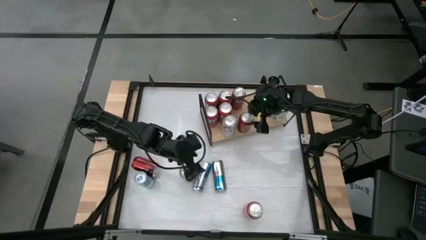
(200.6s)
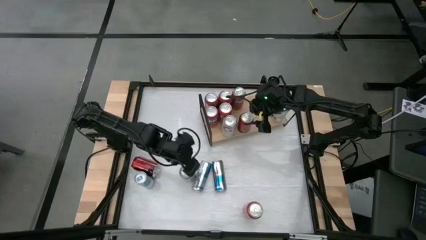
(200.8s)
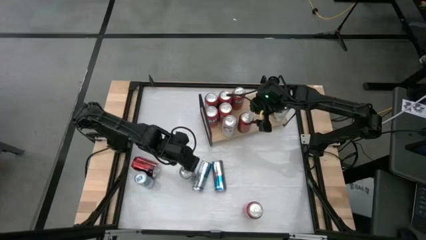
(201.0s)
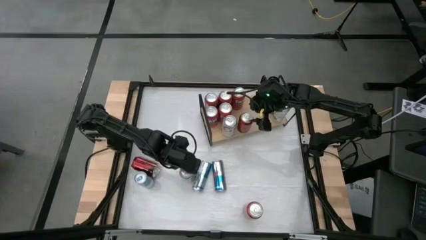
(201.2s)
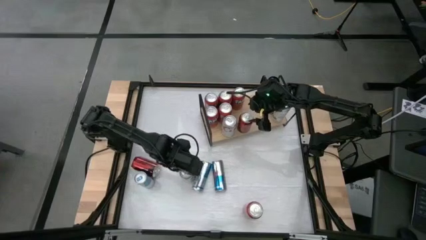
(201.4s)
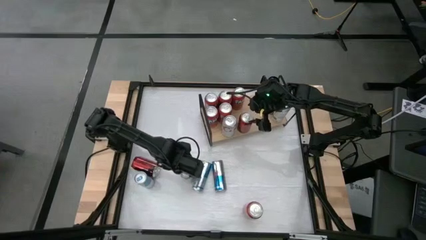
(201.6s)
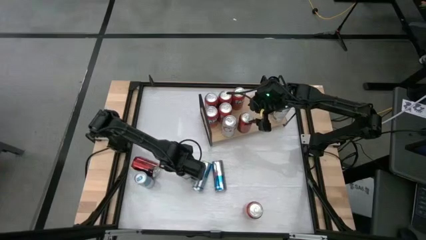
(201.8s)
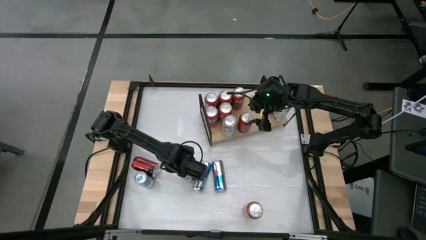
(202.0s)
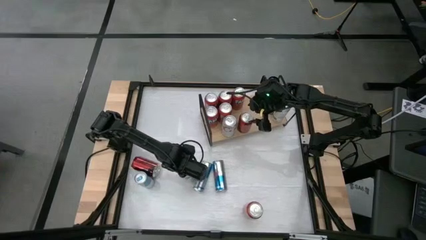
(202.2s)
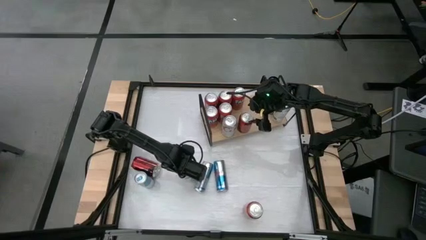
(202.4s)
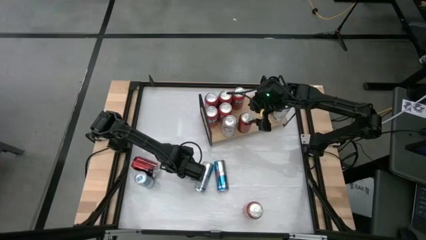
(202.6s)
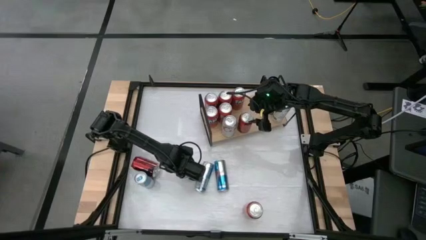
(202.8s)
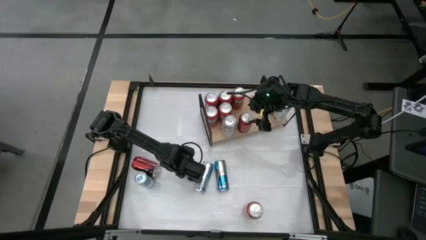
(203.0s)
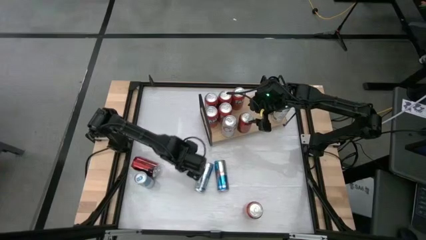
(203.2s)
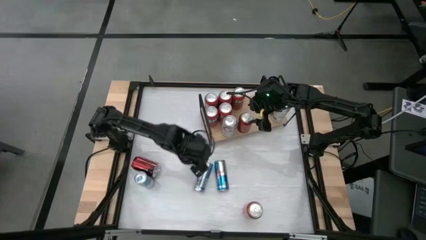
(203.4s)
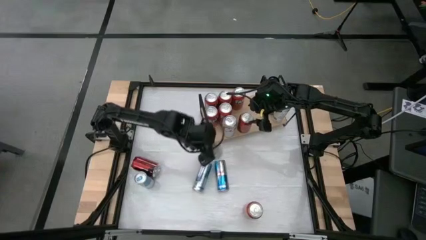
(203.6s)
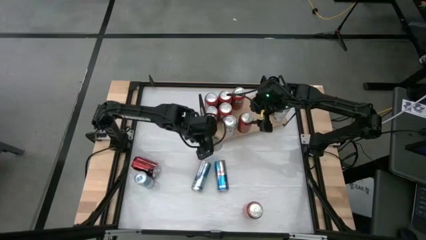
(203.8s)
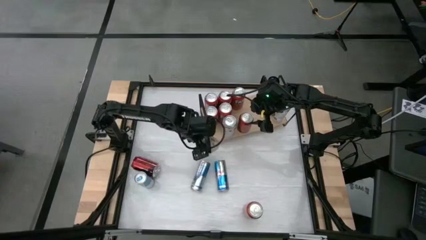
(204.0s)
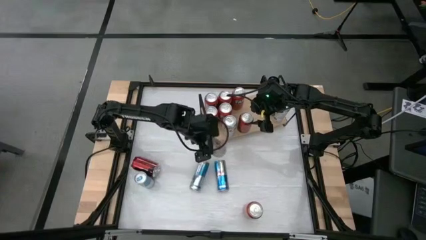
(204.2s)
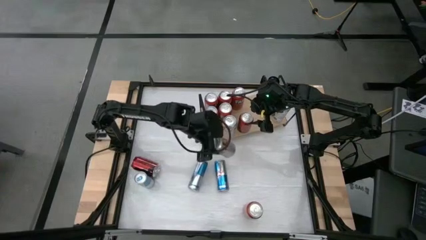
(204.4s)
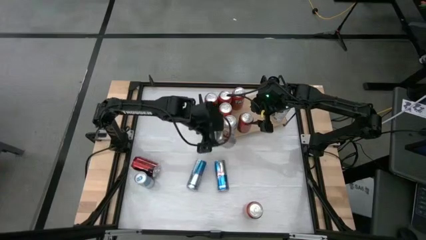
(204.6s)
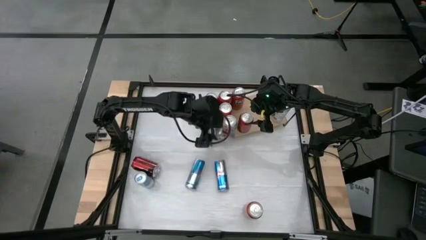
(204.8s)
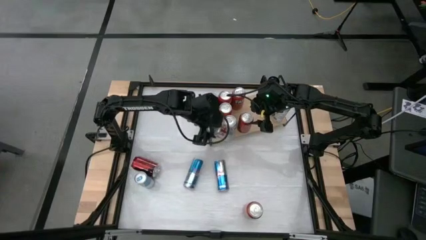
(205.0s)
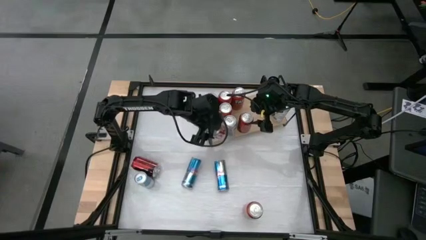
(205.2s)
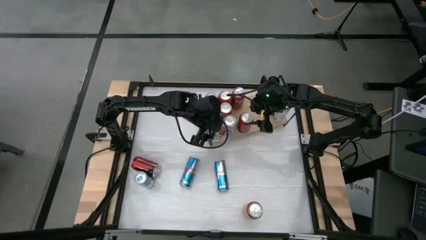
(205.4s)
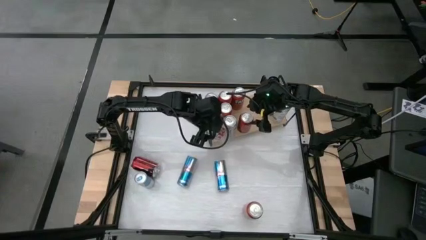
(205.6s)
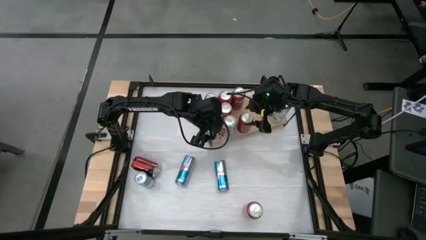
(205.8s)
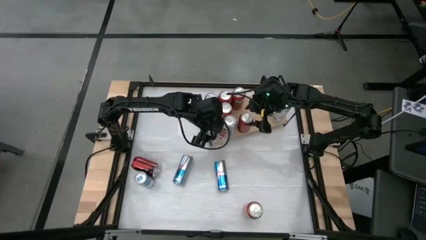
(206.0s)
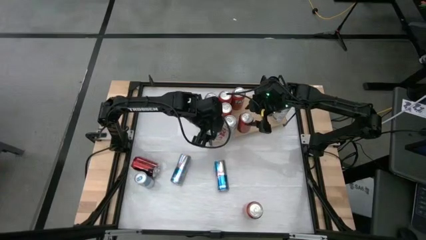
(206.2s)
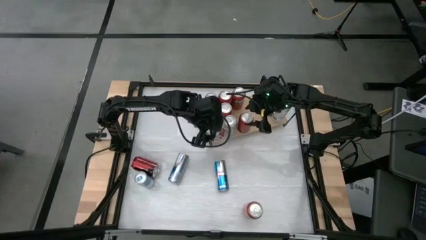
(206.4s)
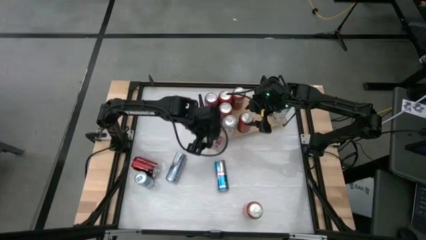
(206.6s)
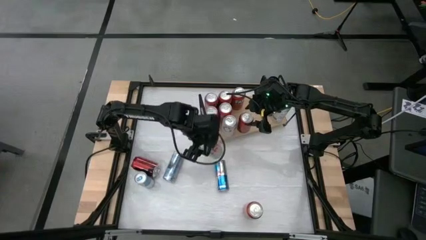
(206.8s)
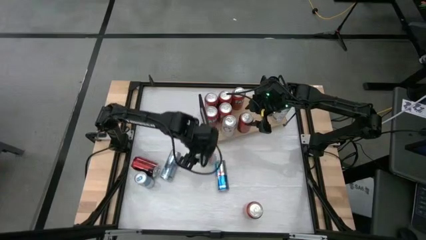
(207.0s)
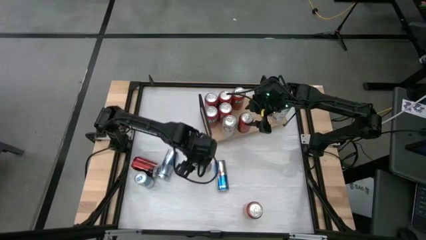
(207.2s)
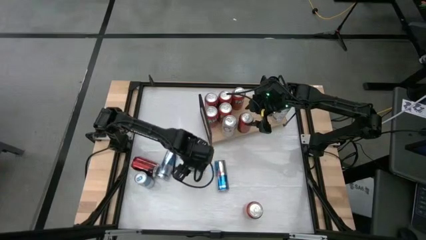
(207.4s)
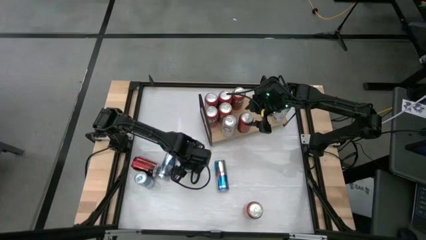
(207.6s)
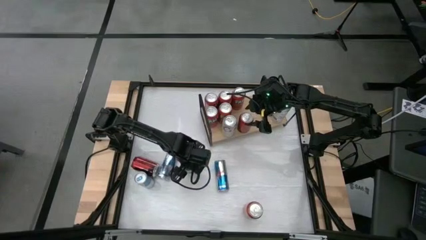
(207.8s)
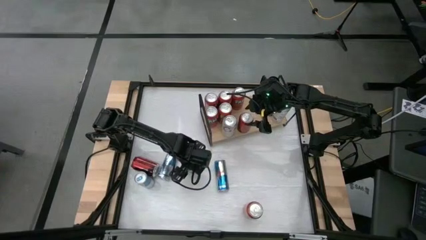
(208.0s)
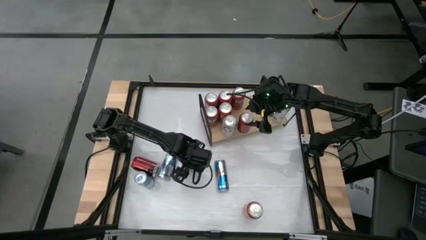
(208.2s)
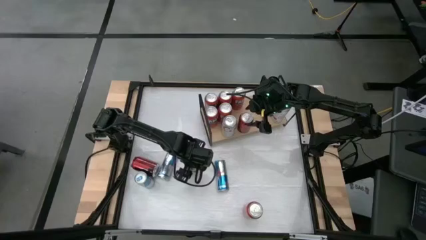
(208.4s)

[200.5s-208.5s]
Task: Place canned beverage on shelf
Put the white soda can on the shelf

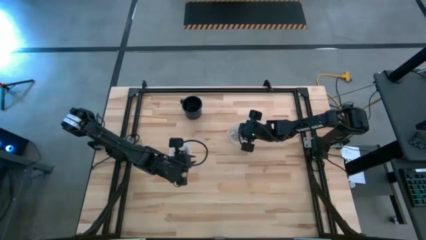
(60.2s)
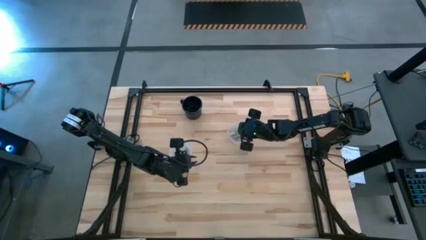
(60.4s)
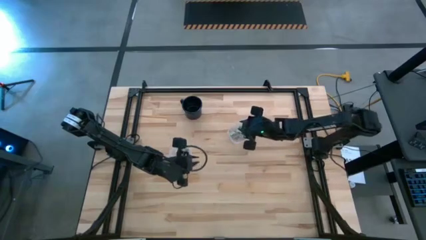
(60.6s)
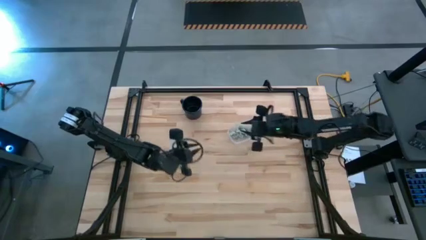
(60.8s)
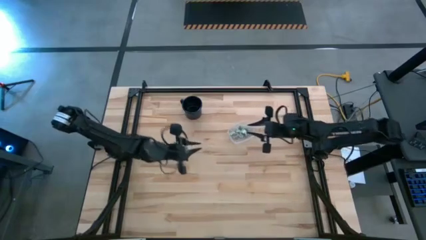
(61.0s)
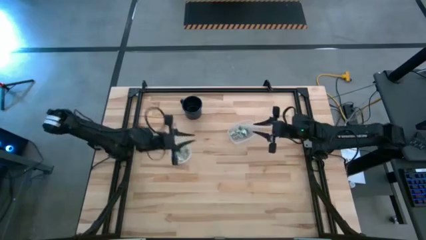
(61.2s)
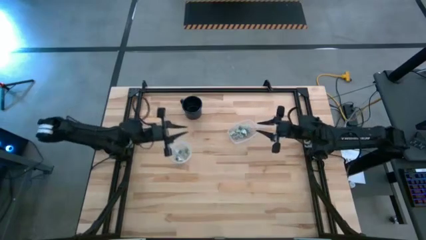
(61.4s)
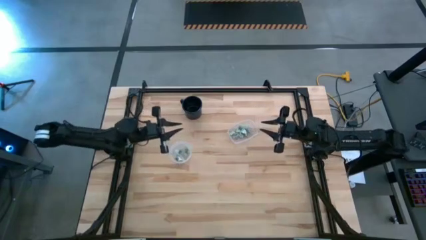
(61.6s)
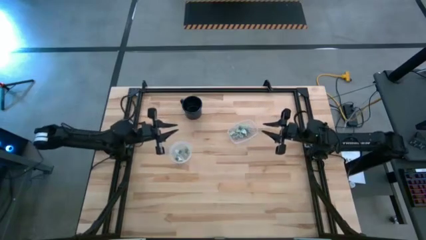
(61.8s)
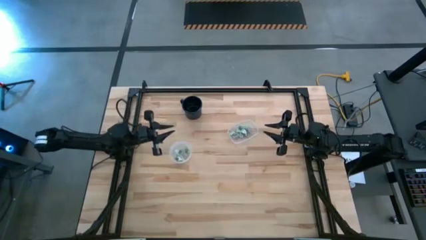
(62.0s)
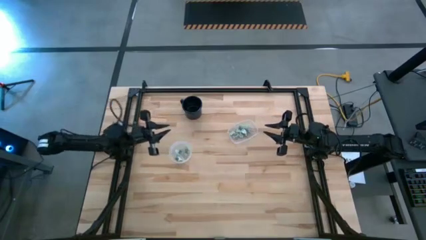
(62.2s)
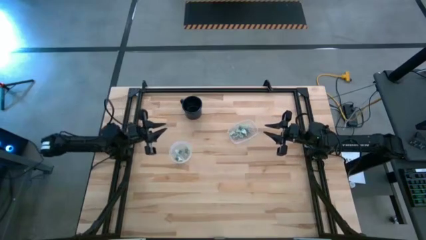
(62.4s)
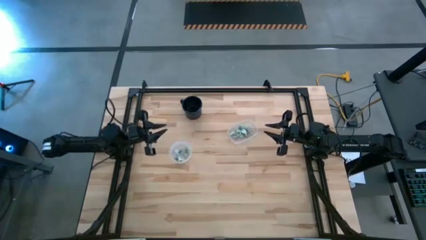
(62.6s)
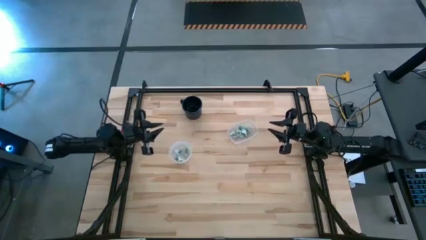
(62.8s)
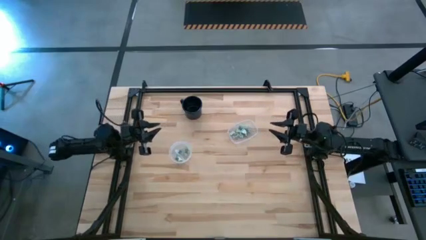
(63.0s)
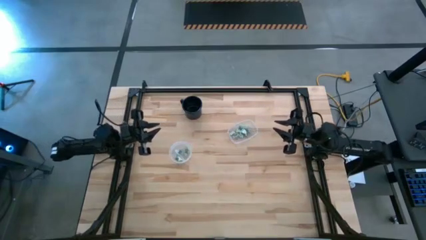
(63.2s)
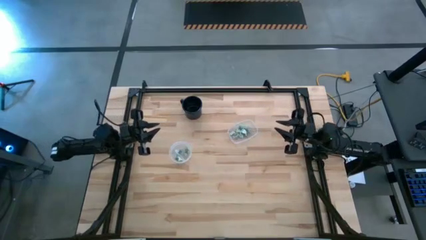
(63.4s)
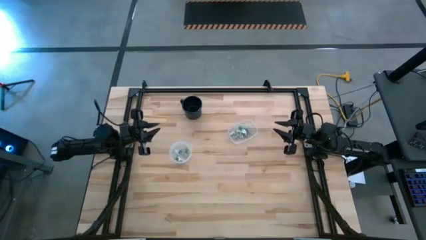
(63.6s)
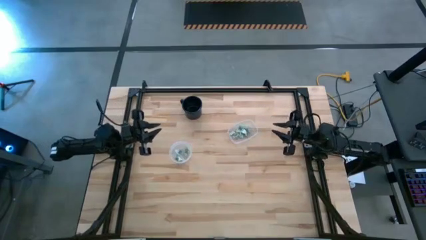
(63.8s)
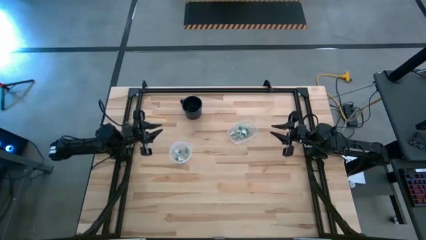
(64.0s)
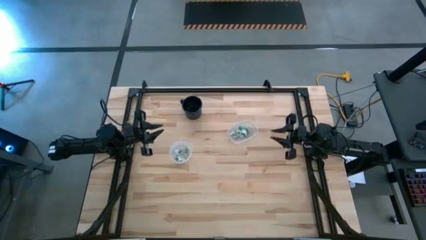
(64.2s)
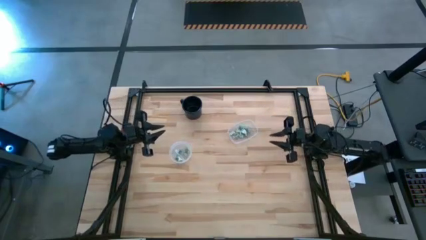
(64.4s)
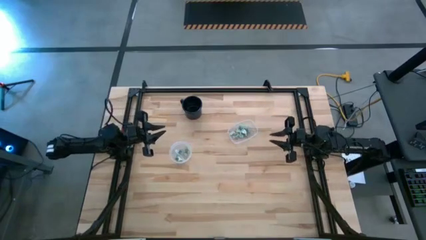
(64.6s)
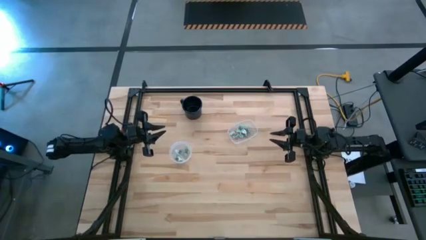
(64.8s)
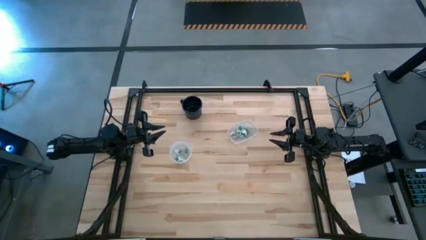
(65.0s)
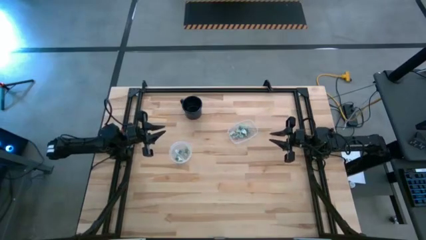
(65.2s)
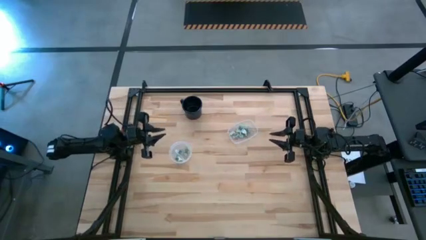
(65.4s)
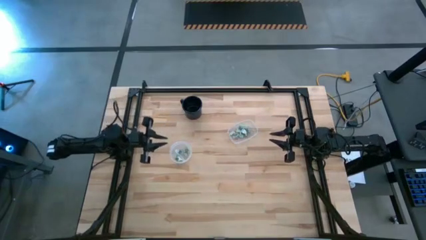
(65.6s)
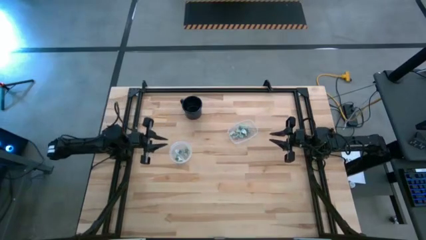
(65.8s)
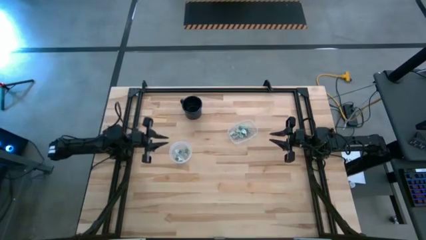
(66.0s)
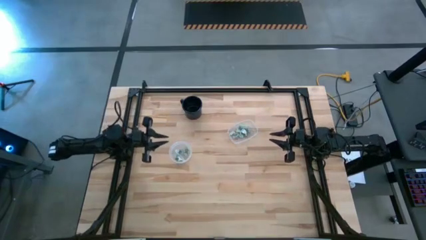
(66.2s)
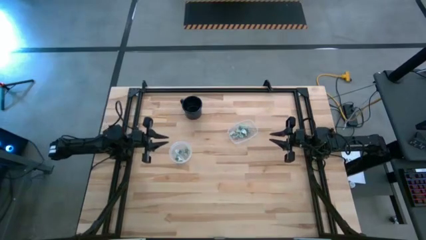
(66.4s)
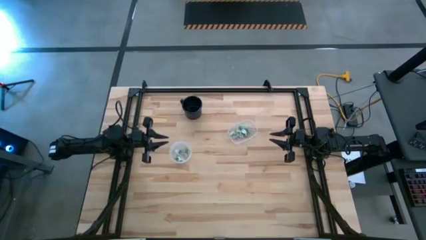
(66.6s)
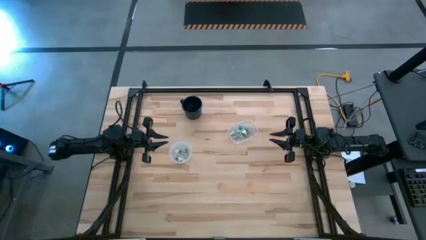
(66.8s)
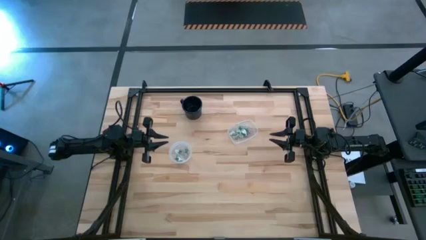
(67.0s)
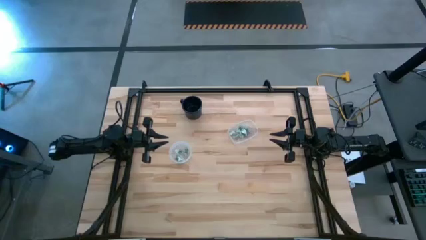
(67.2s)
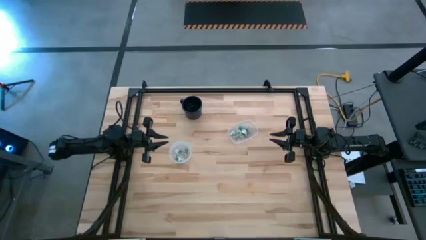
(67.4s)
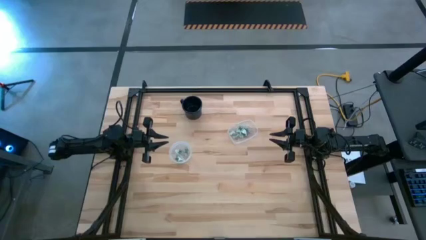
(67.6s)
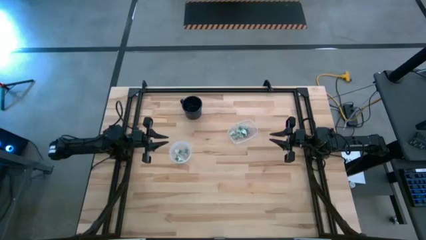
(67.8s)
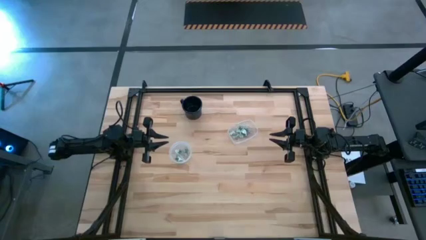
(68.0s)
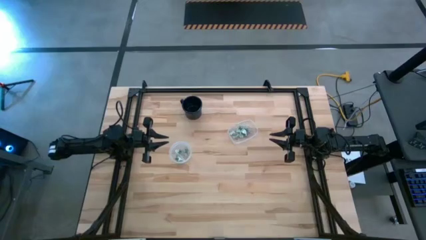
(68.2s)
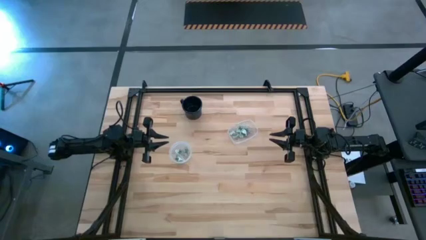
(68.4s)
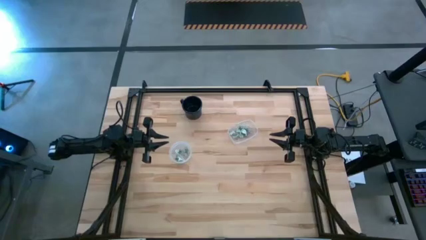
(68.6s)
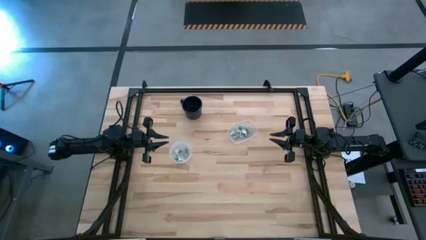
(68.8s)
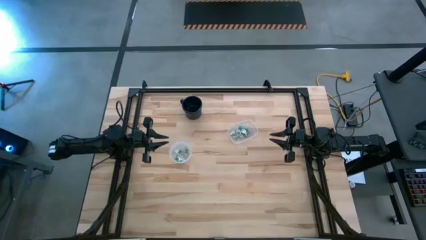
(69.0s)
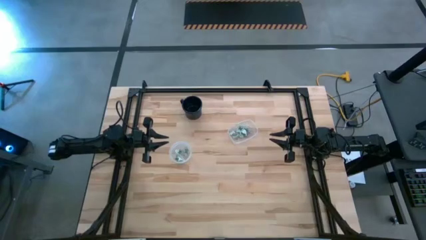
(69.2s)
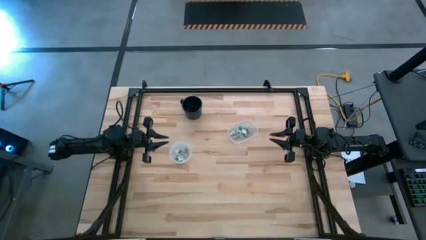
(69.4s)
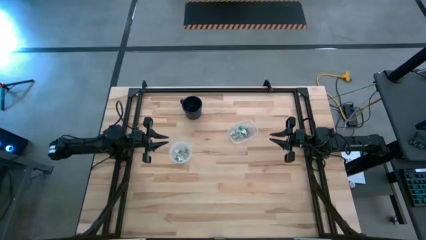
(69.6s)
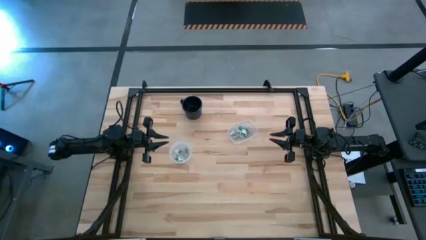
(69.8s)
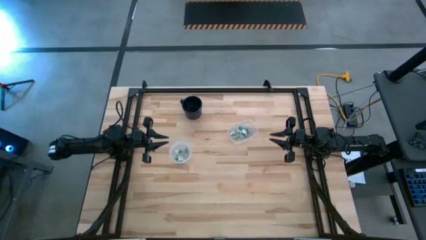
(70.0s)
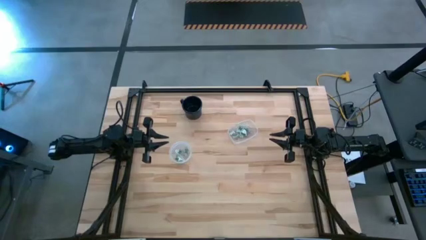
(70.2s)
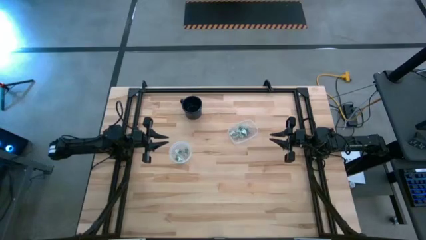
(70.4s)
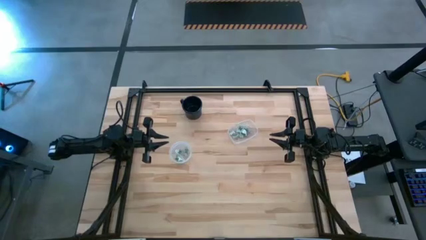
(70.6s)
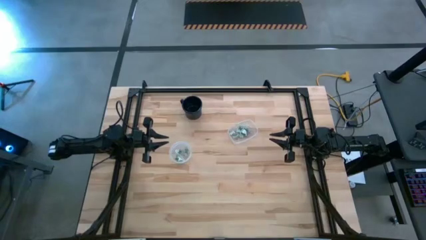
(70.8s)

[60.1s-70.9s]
Task: Pick and place items into bin
Return to Home Position
